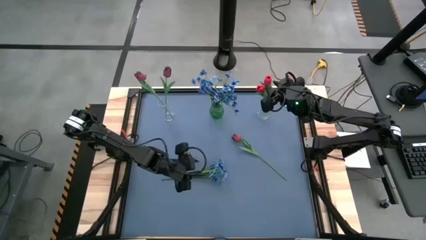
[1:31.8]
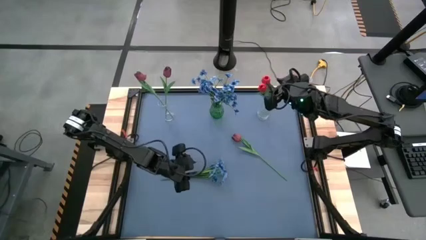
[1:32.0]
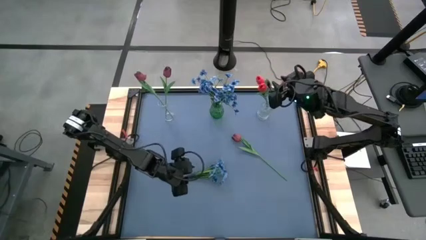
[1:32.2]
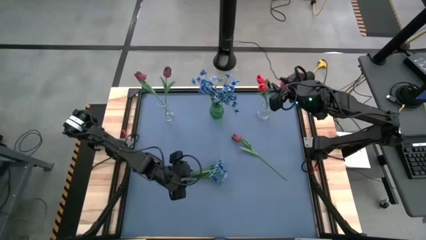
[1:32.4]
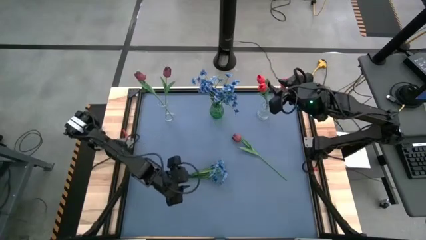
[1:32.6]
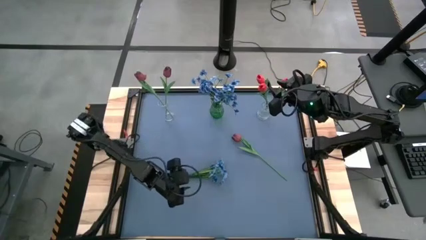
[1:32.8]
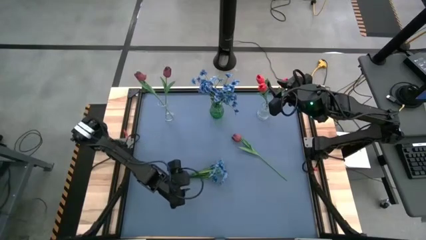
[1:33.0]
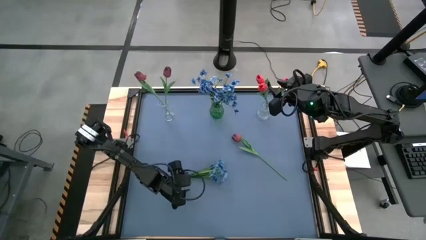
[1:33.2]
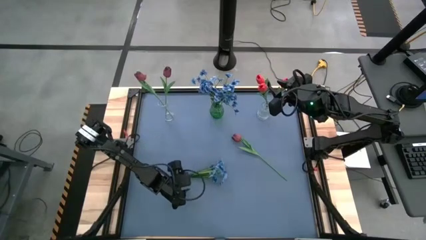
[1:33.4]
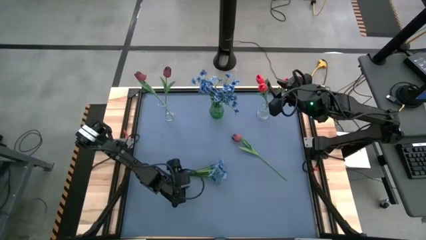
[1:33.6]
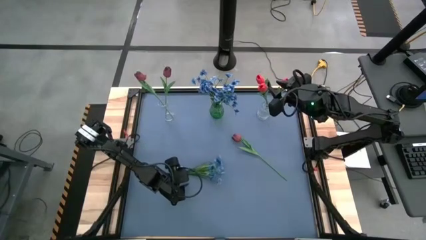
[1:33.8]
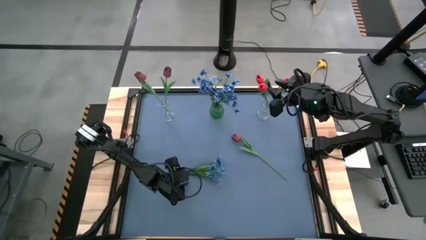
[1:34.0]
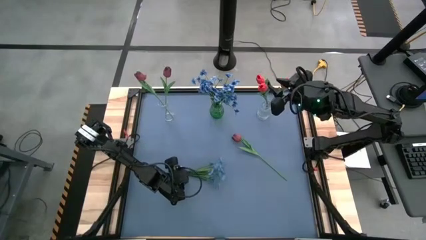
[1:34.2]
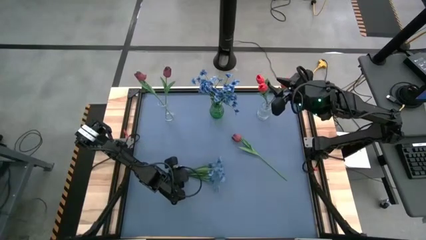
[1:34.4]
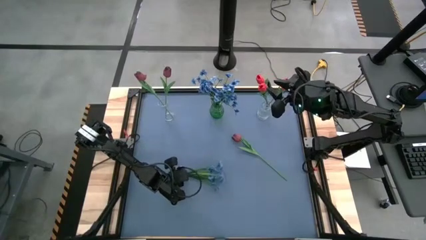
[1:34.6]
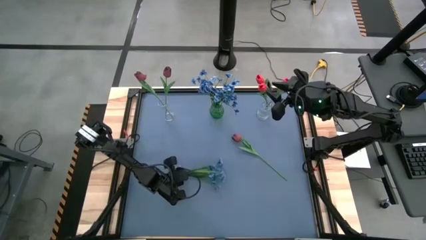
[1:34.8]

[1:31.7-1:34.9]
Task: Sort flowers into vase by color
Put the blue flower into the green vase

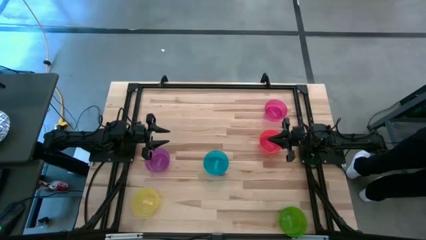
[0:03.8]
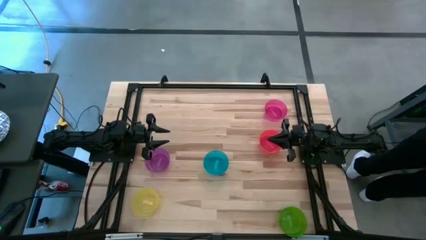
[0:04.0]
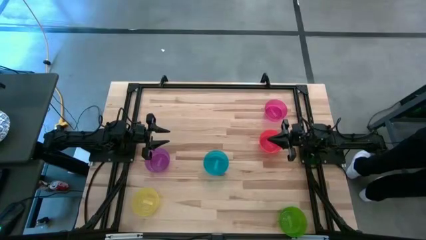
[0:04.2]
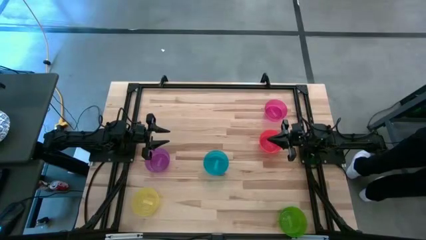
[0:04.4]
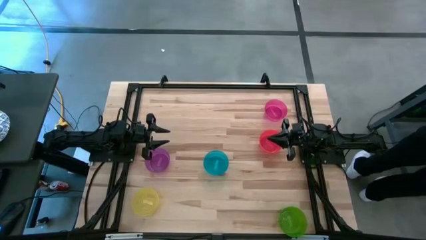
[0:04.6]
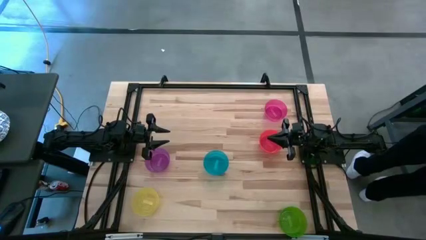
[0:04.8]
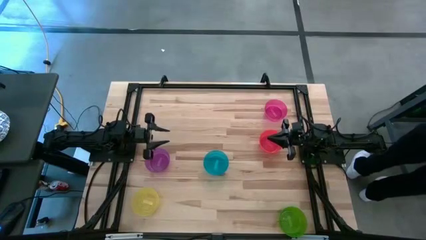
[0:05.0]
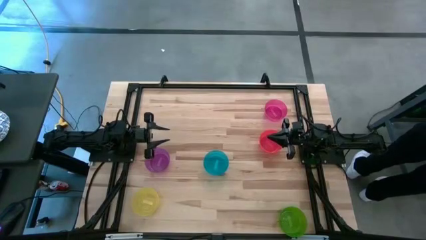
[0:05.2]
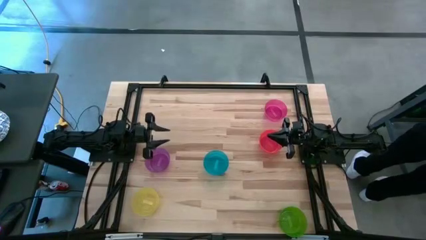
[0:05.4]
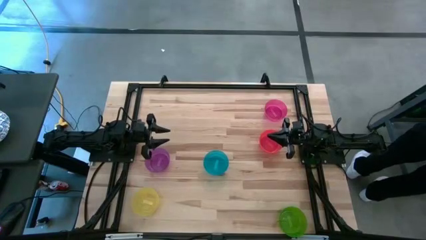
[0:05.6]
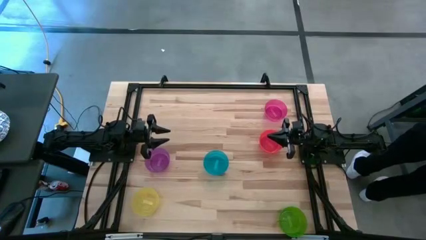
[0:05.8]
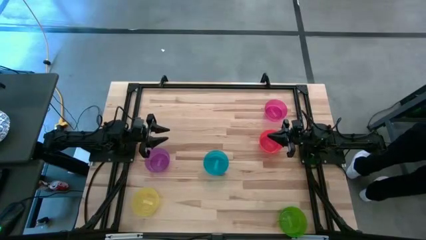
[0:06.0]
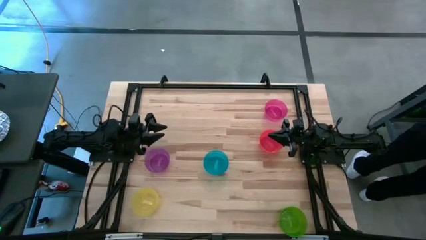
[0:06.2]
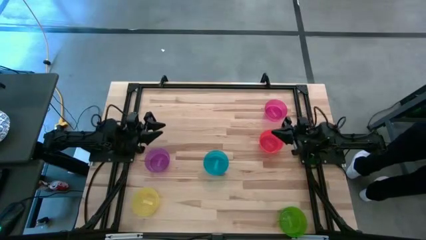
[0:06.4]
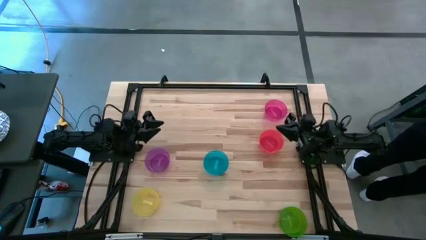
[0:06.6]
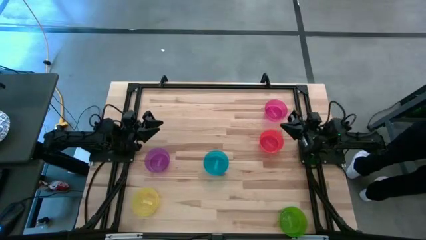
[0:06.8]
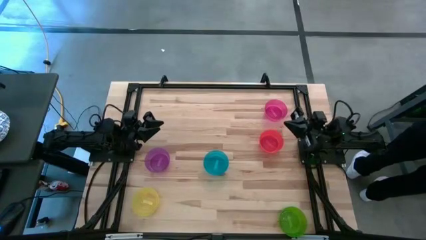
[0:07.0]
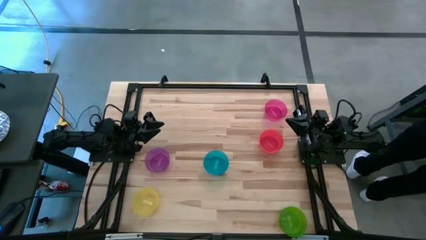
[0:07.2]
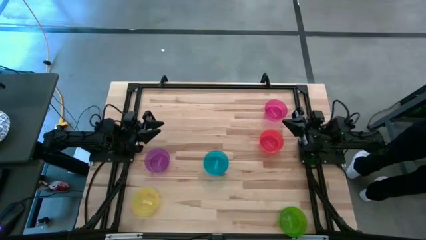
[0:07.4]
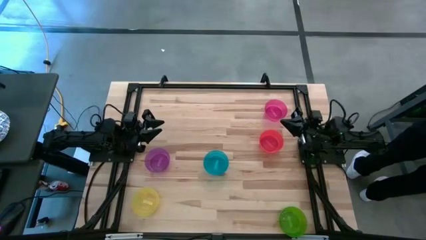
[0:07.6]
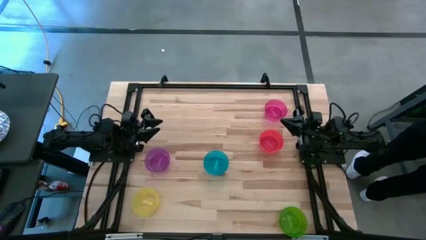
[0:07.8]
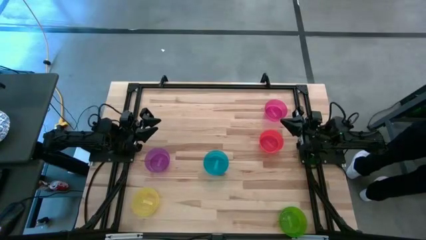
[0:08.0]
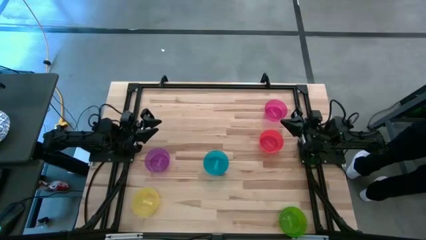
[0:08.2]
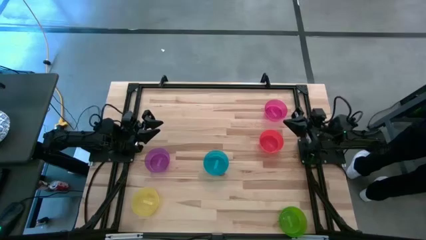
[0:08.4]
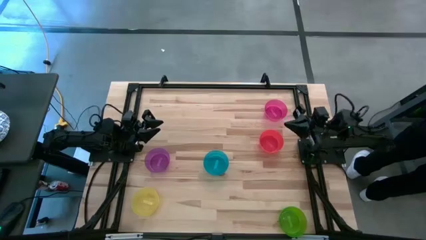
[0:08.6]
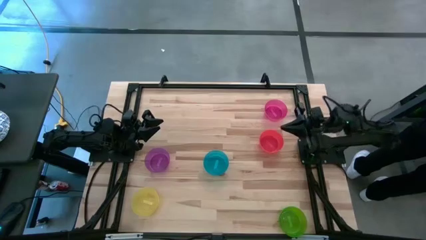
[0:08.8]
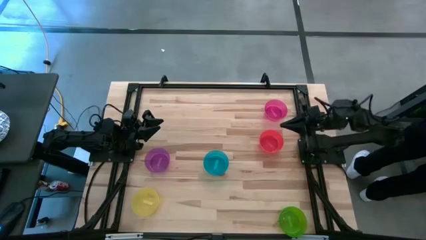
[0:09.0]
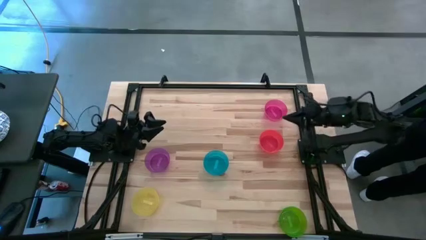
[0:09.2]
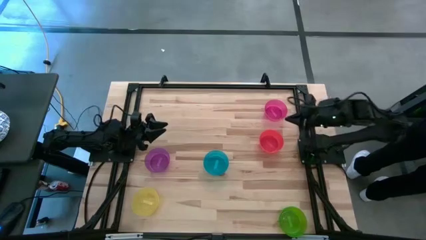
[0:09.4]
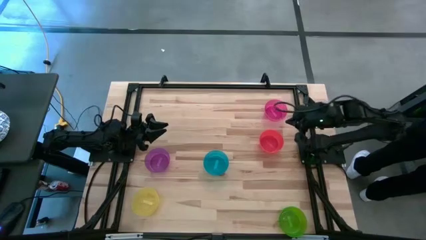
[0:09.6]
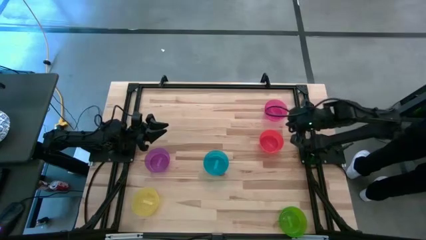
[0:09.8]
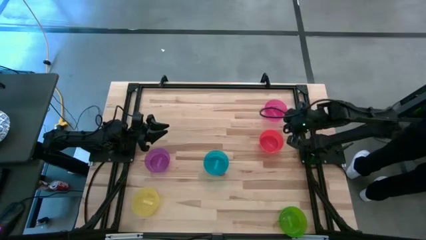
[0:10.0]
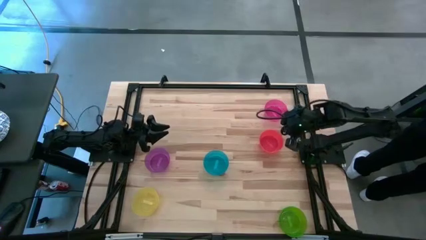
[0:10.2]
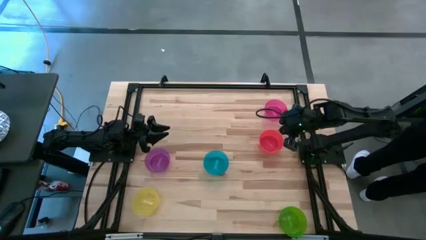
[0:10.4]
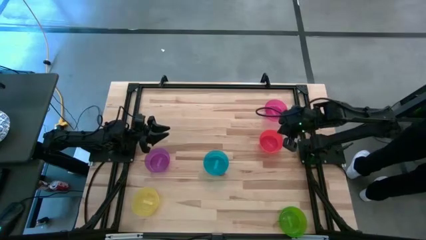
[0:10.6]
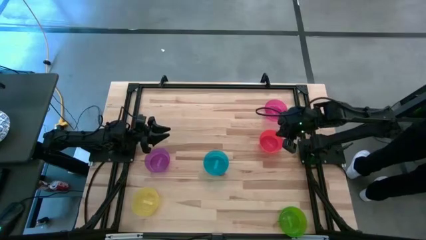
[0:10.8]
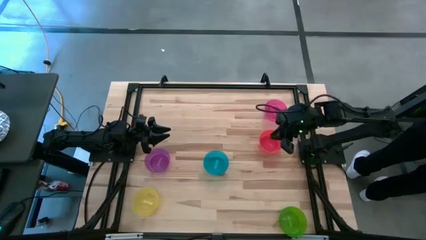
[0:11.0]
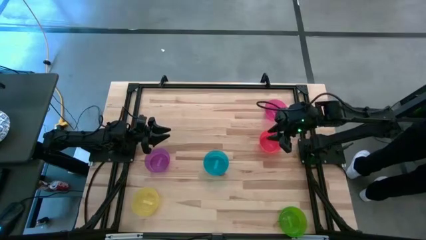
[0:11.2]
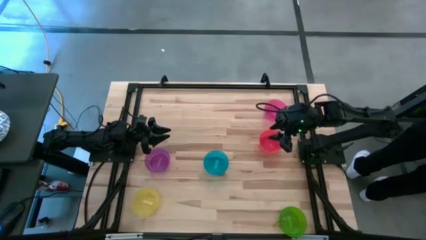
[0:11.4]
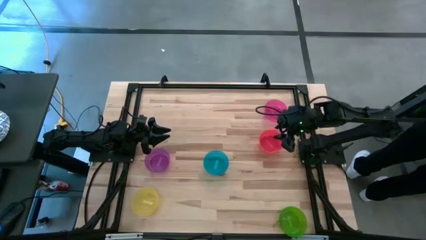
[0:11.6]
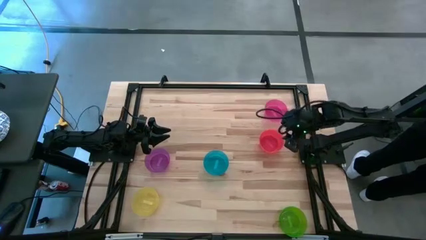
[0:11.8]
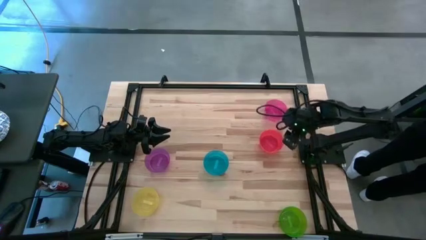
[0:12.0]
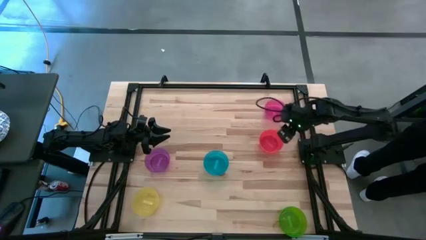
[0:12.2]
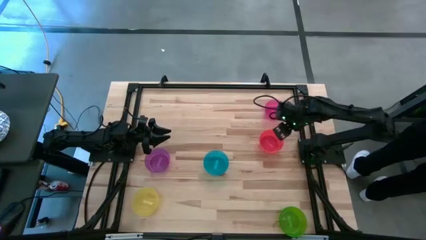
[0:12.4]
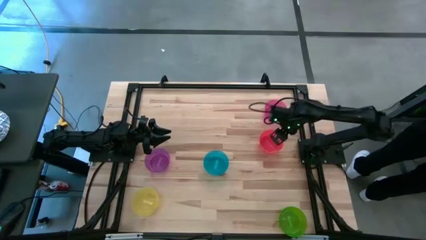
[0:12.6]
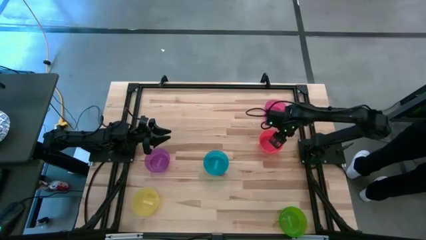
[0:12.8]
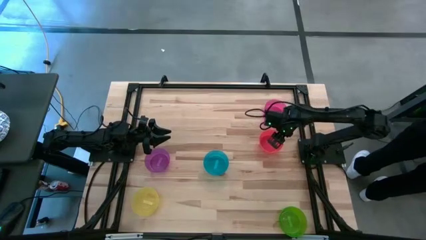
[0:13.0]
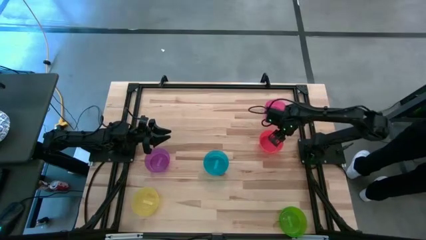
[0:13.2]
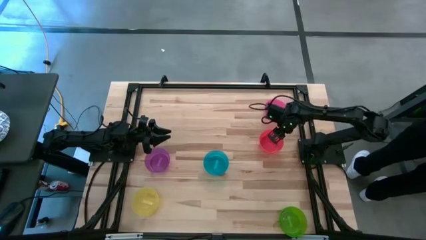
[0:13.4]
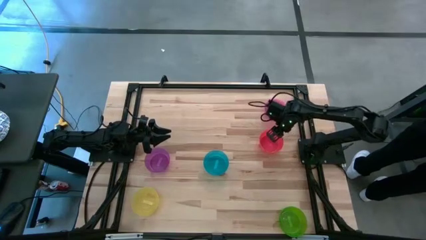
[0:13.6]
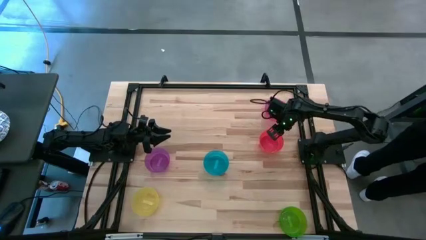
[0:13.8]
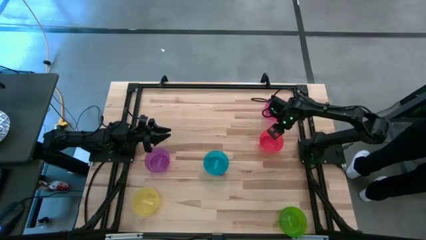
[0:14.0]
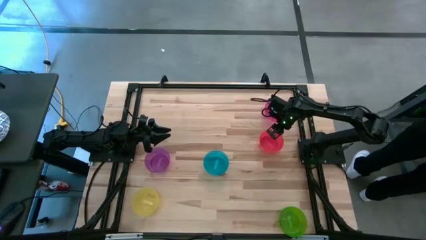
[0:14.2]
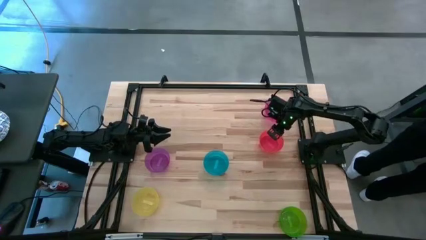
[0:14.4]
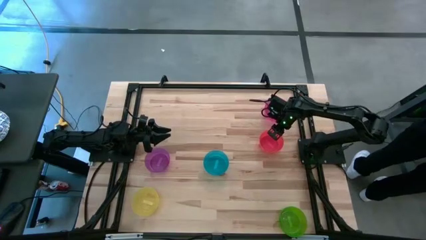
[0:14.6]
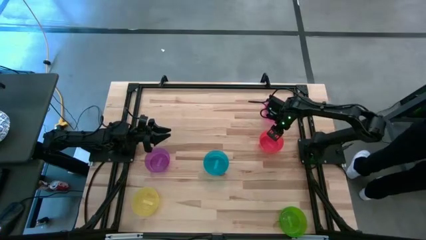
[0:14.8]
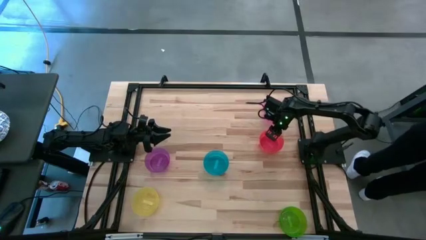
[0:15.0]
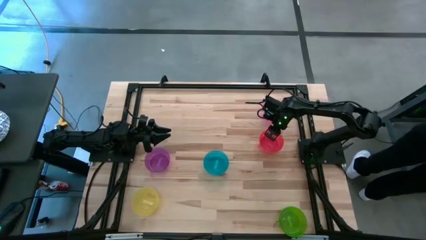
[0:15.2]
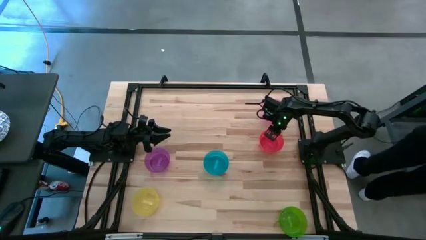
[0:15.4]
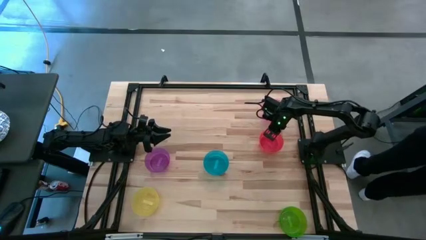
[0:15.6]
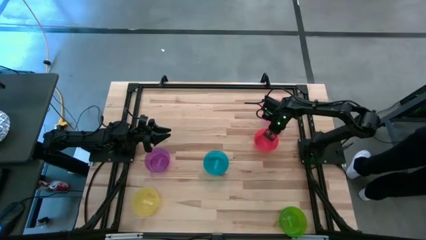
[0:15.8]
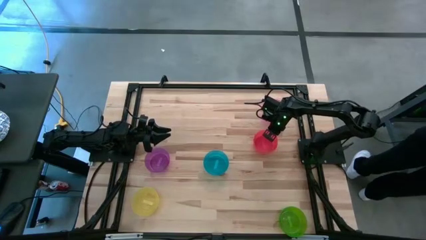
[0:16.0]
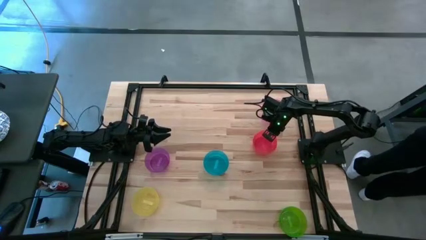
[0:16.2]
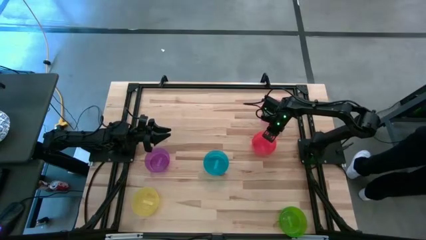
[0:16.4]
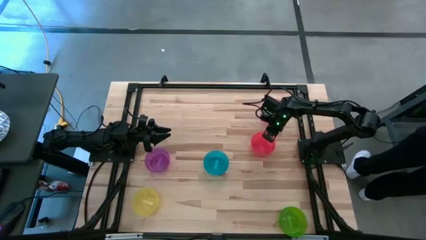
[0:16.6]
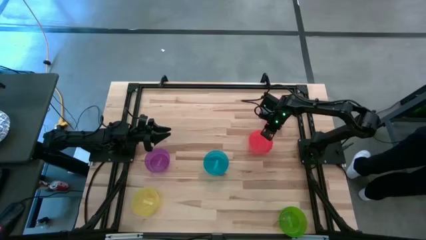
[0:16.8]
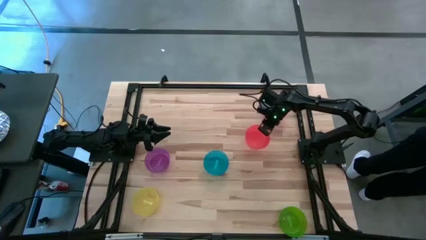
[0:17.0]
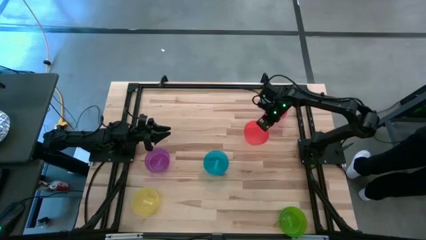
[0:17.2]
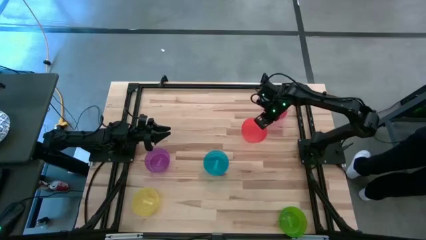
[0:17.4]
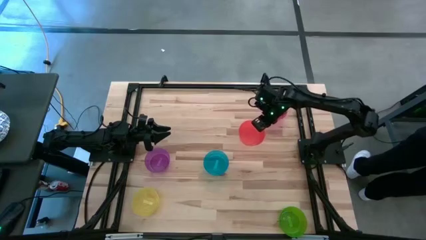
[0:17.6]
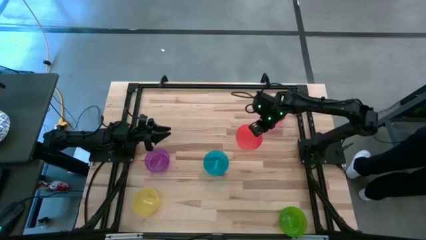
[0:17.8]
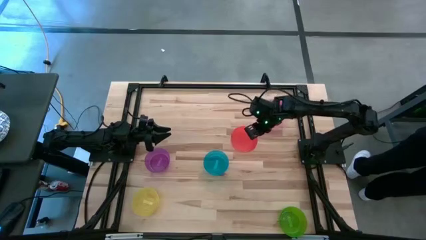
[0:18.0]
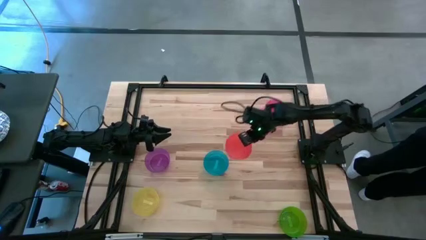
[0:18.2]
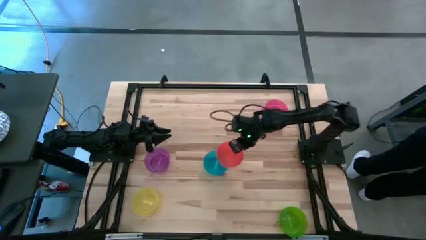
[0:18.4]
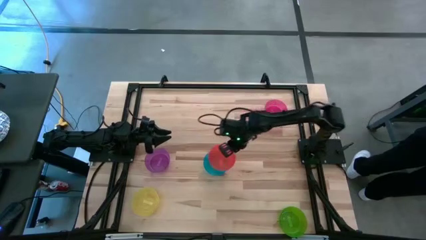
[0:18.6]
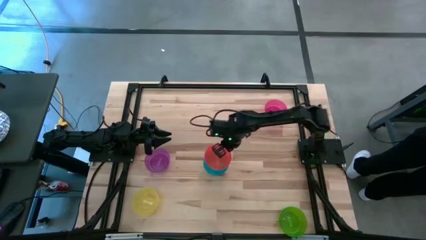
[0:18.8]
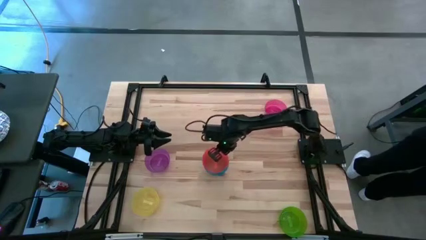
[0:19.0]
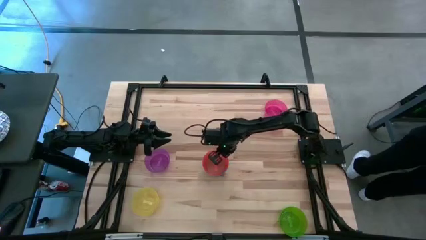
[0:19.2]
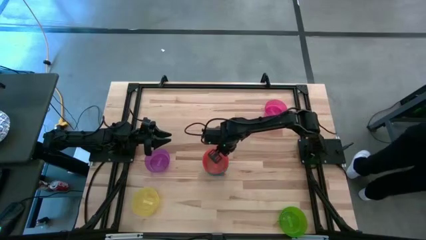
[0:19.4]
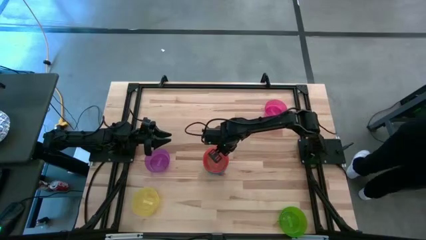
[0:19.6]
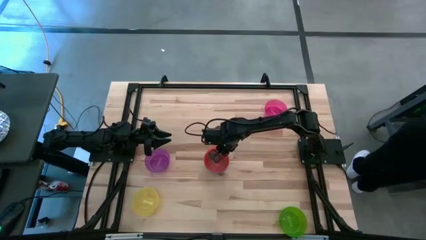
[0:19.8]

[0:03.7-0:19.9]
Task: Nest bowls inside each other
Stack the orange bowl on top of the blue bowl
